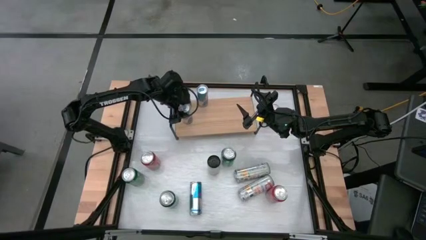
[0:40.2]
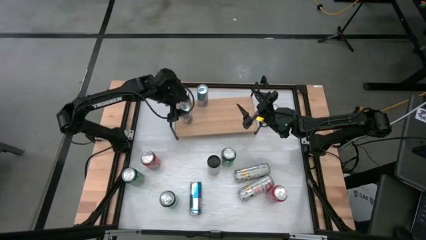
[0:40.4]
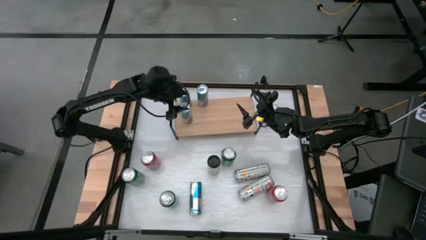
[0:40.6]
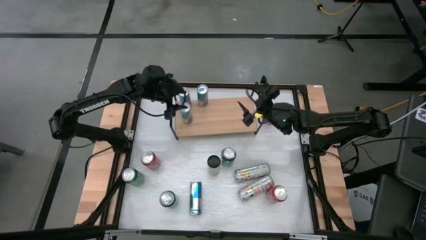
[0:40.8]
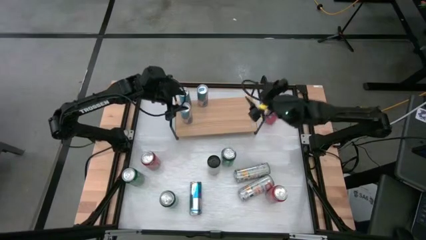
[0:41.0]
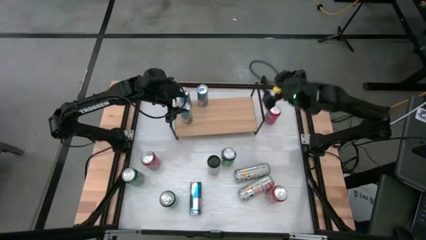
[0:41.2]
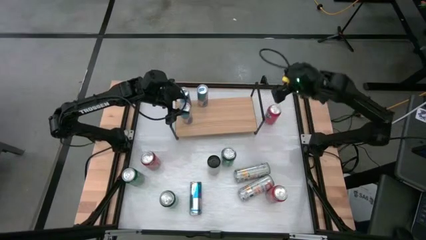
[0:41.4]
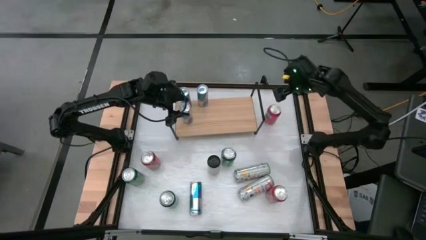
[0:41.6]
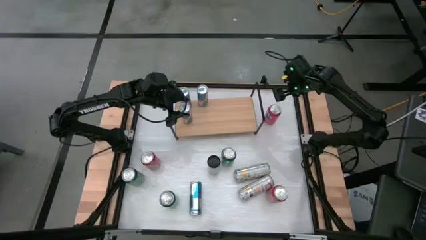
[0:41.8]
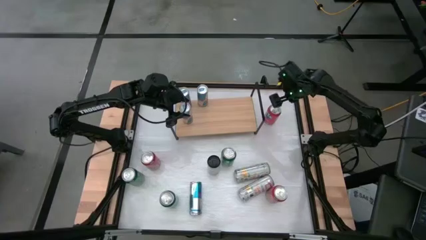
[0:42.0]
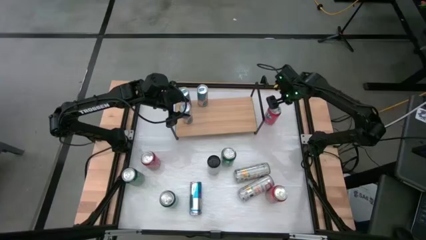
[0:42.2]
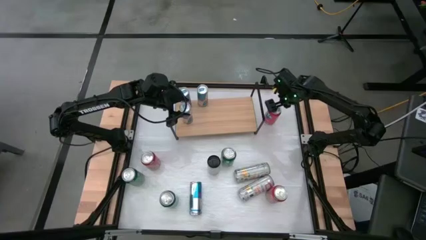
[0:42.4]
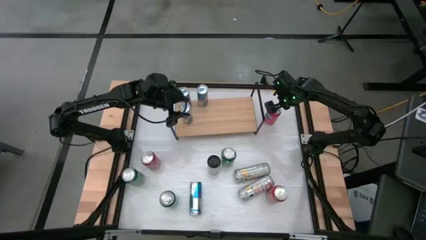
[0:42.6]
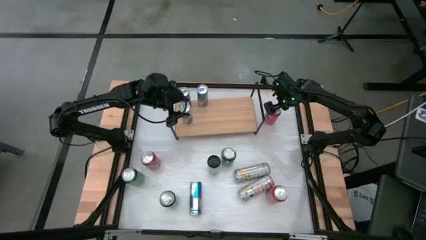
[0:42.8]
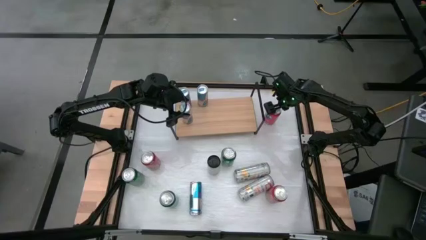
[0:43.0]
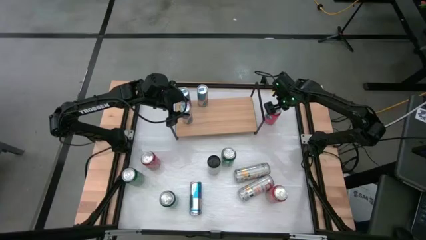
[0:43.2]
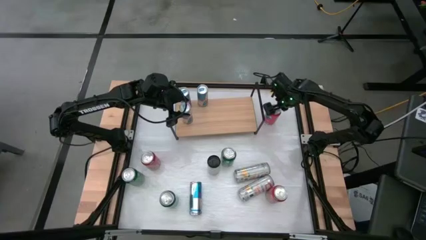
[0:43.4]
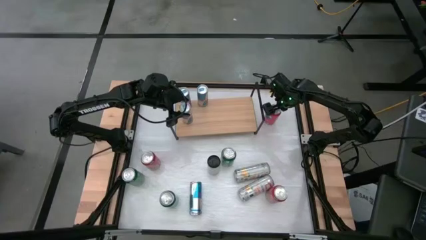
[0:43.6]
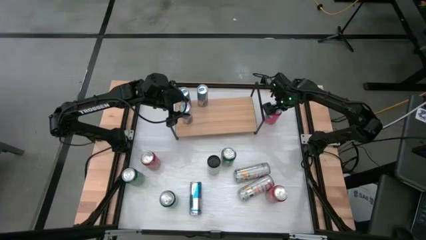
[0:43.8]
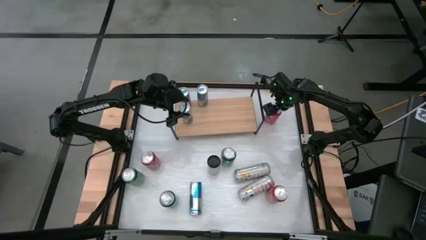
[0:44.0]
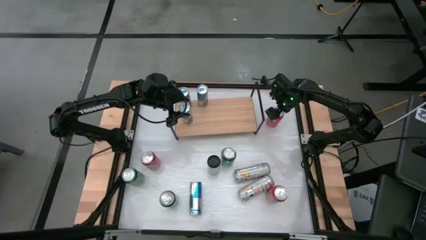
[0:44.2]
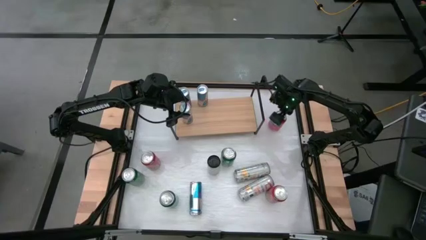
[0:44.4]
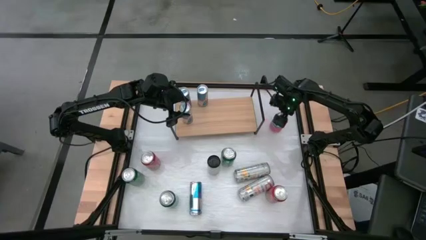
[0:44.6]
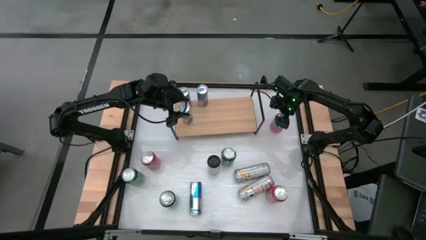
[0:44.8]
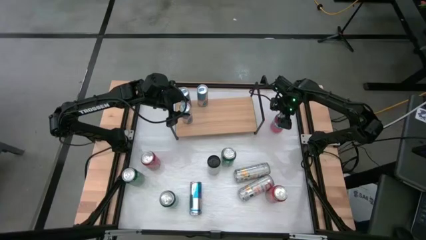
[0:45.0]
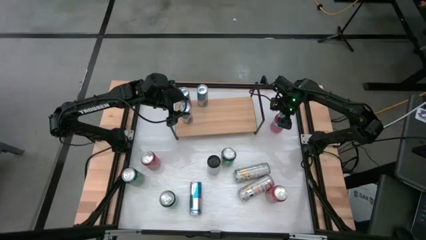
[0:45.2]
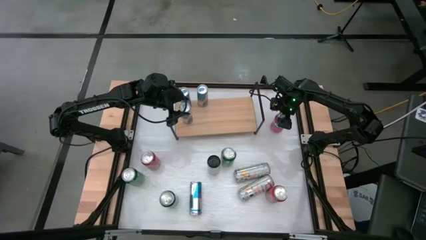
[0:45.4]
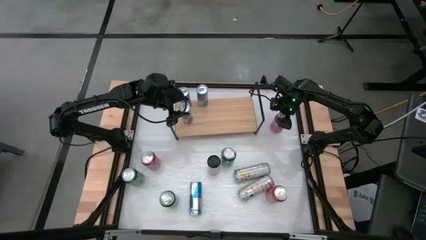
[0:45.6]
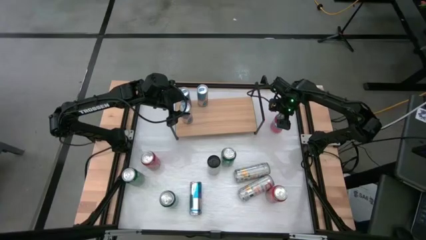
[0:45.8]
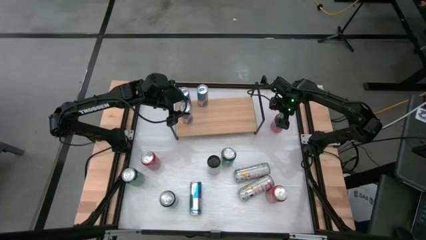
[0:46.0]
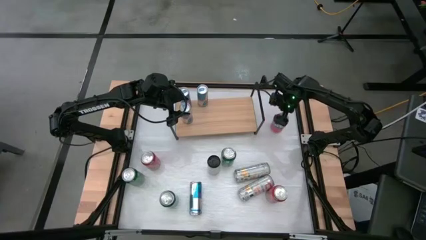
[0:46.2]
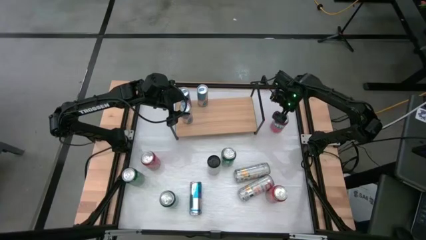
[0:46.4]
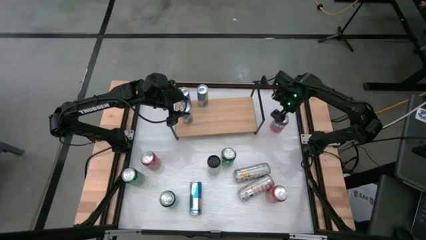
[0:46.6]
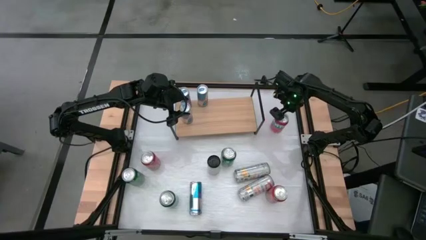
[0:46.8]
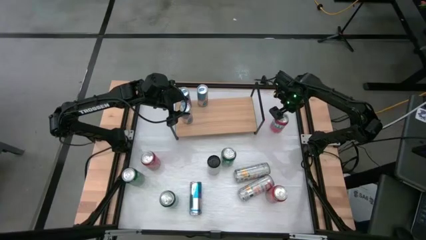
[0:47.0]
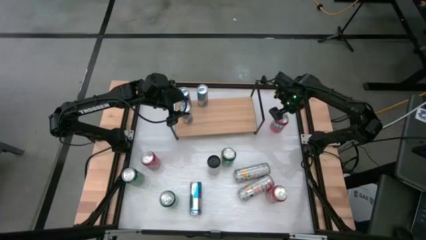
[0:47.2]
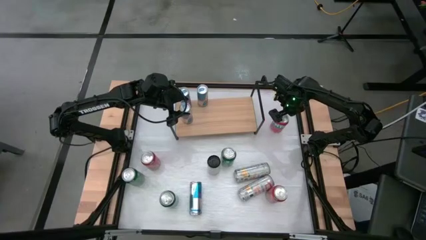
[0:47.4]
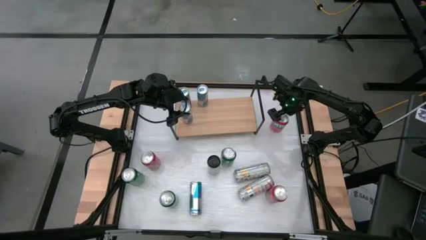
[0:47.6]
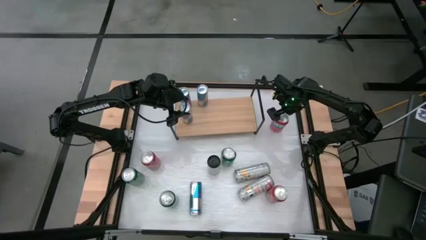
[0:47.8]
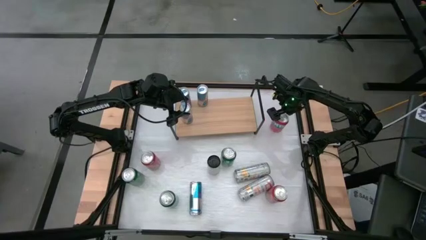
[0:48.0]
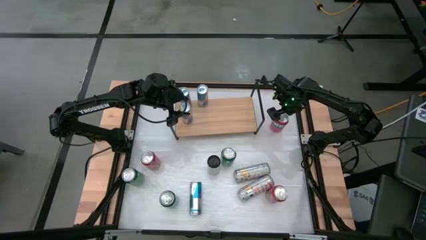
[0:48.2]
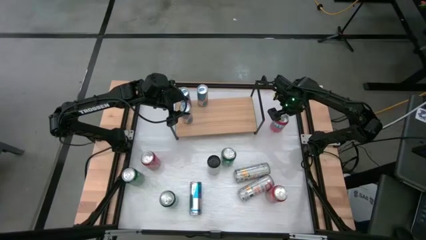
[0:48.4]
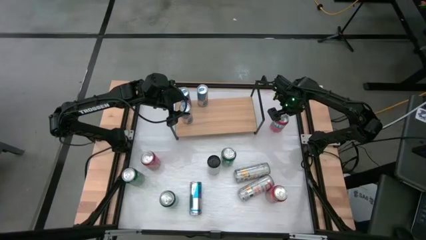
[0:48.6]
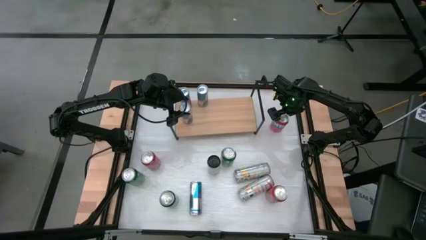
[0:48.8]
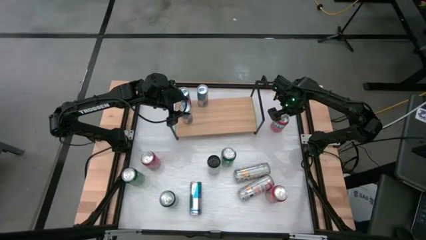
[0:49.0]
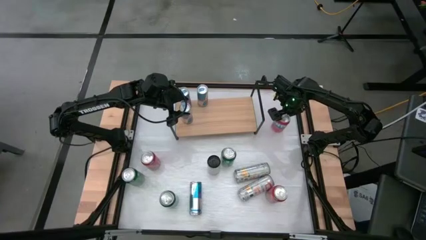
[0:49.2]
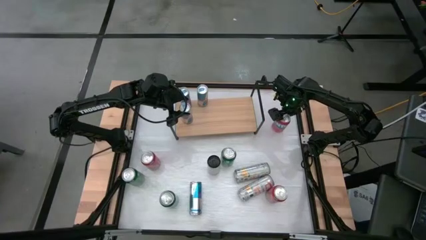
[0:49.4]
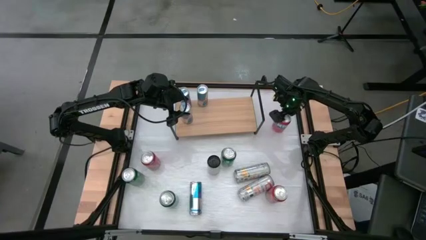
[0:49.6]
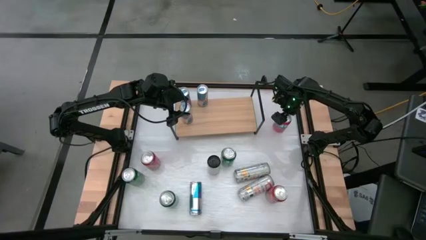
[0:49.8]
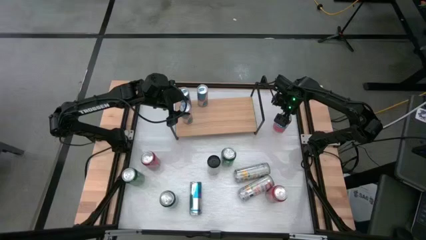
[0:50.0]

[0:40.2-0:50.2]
Task: Sort soda cans
Put the orange soda can on the shelf
